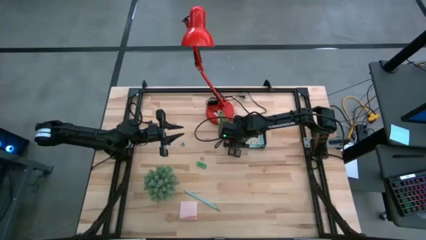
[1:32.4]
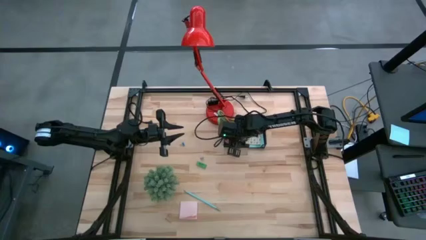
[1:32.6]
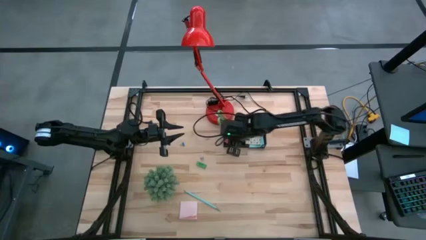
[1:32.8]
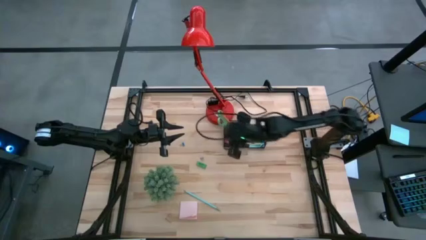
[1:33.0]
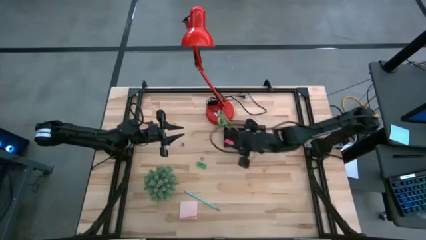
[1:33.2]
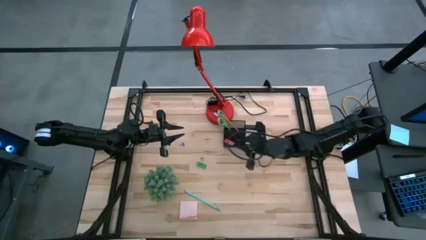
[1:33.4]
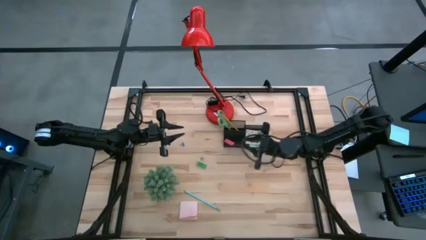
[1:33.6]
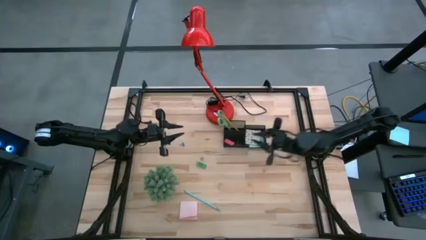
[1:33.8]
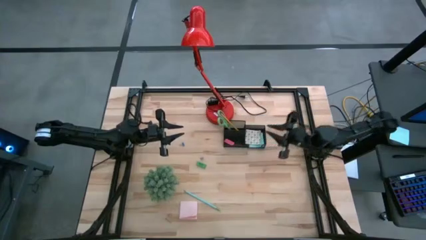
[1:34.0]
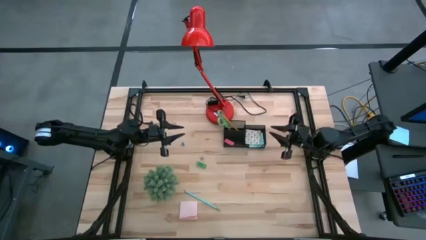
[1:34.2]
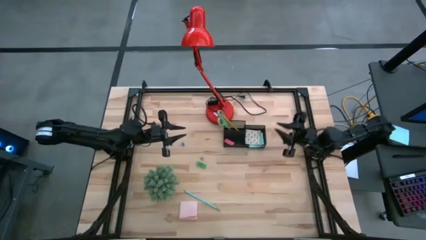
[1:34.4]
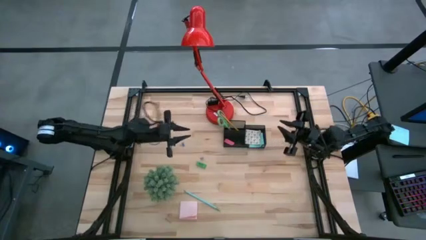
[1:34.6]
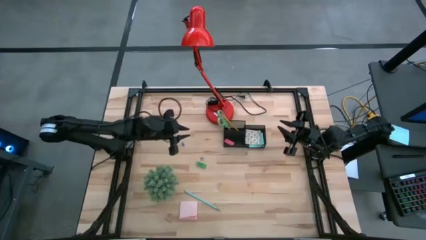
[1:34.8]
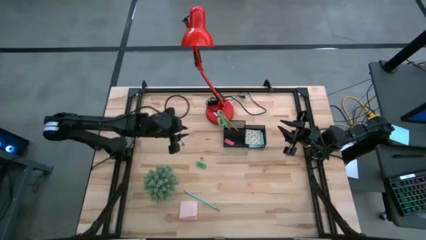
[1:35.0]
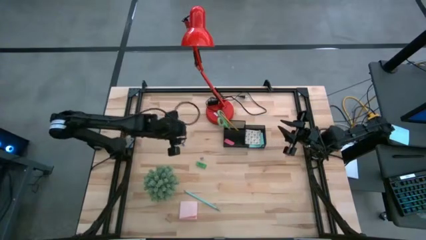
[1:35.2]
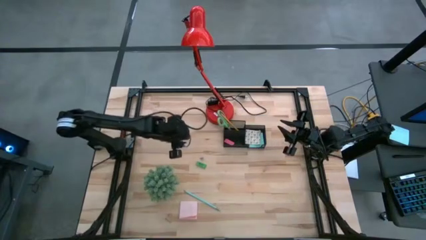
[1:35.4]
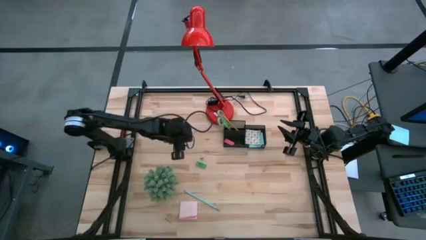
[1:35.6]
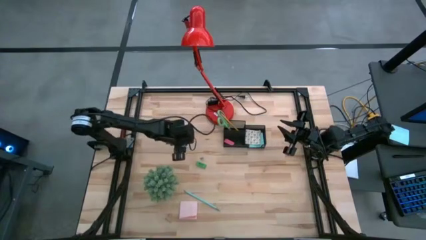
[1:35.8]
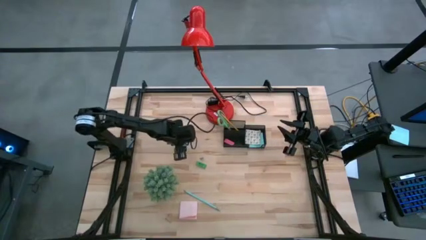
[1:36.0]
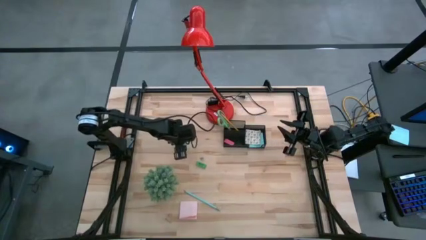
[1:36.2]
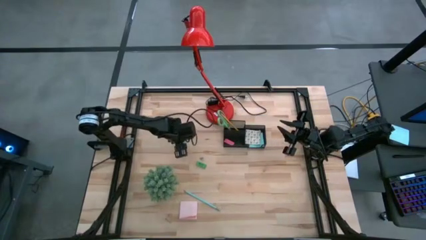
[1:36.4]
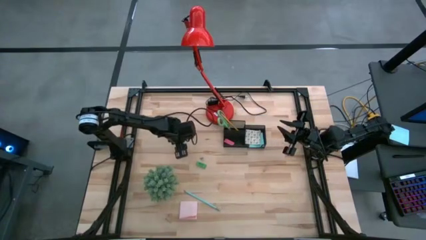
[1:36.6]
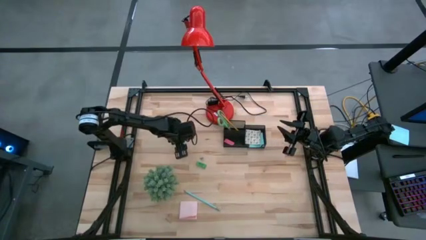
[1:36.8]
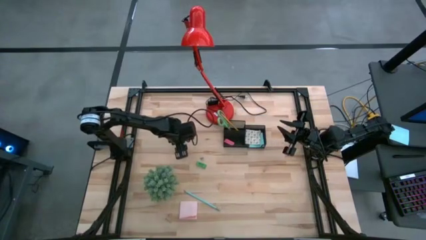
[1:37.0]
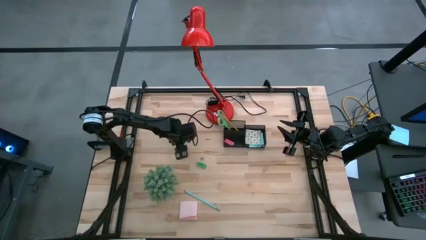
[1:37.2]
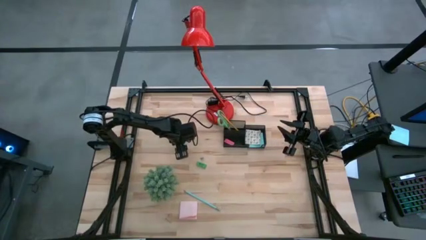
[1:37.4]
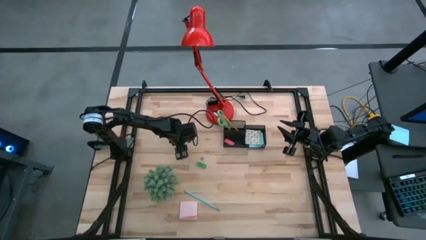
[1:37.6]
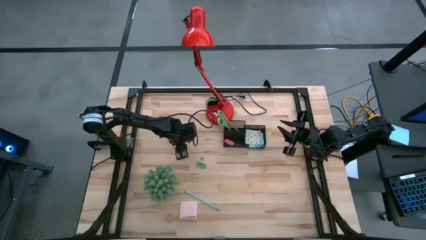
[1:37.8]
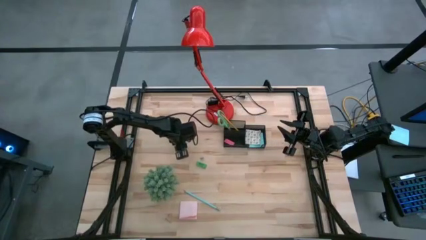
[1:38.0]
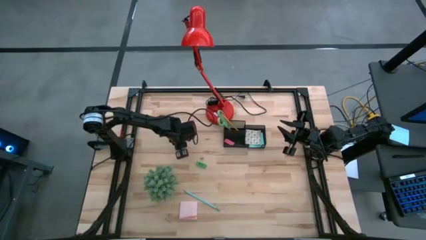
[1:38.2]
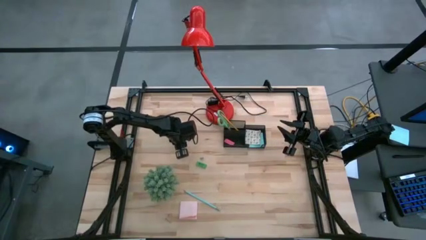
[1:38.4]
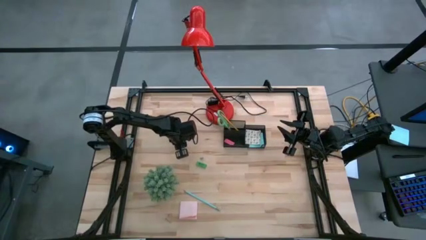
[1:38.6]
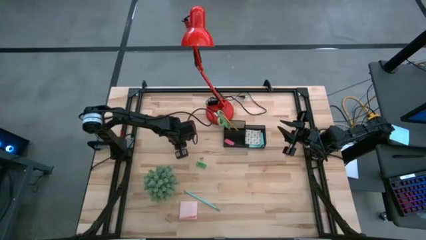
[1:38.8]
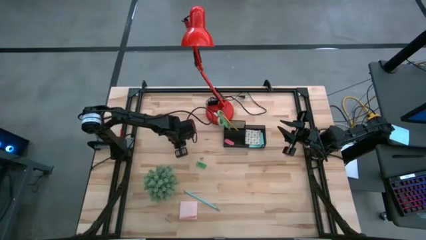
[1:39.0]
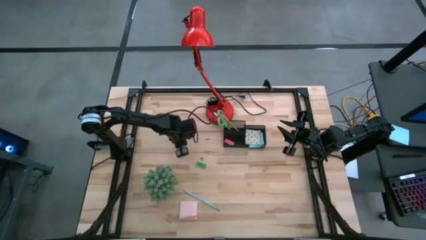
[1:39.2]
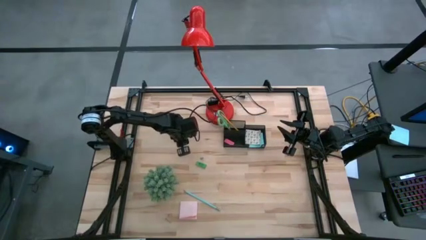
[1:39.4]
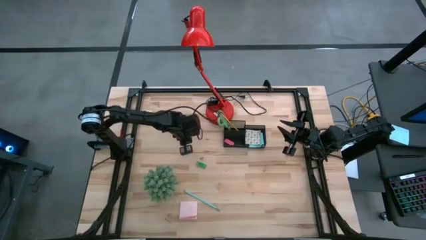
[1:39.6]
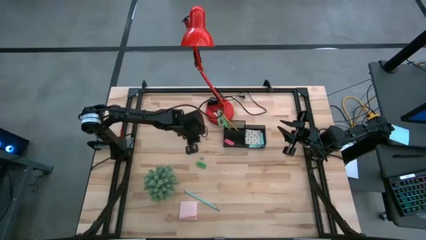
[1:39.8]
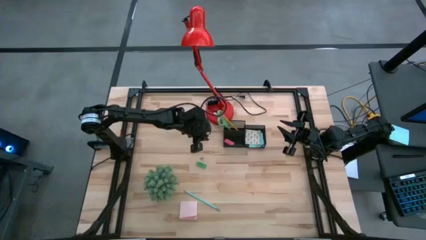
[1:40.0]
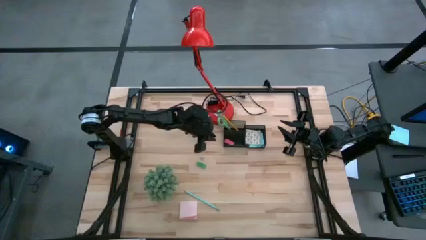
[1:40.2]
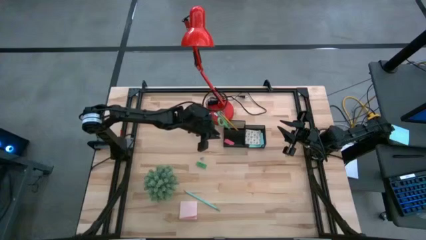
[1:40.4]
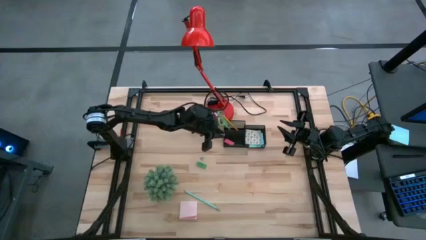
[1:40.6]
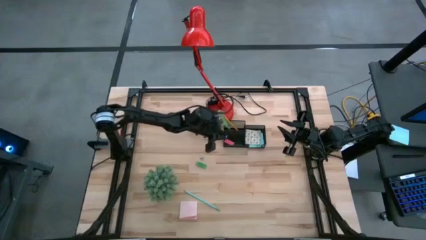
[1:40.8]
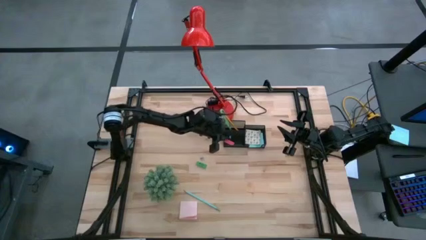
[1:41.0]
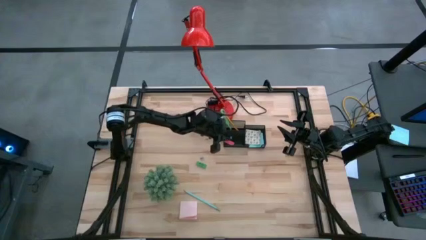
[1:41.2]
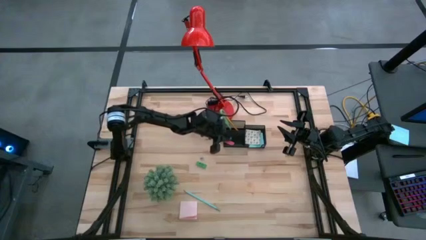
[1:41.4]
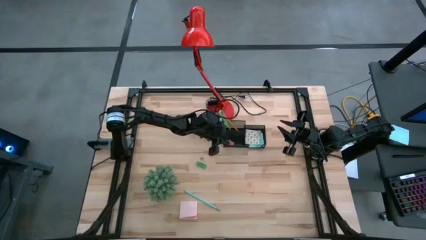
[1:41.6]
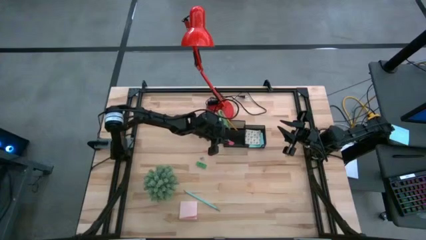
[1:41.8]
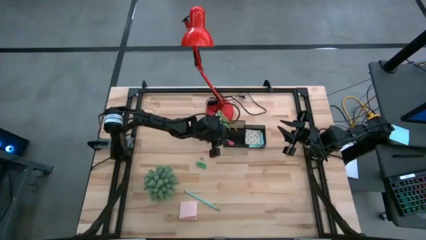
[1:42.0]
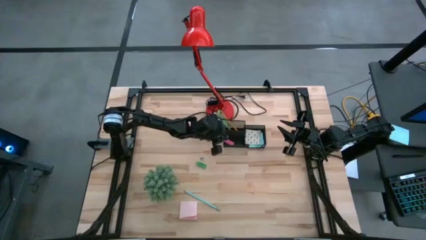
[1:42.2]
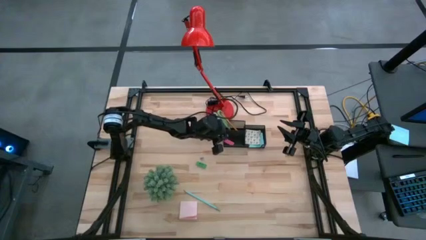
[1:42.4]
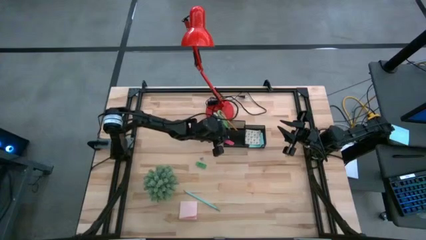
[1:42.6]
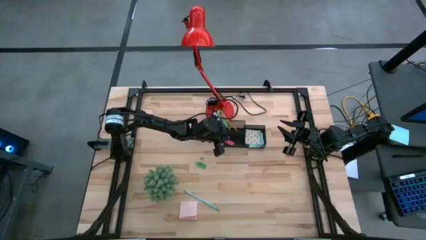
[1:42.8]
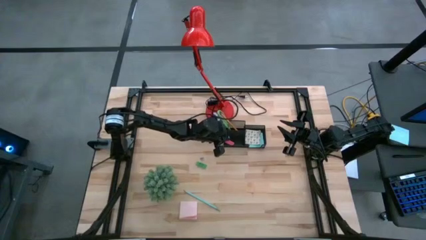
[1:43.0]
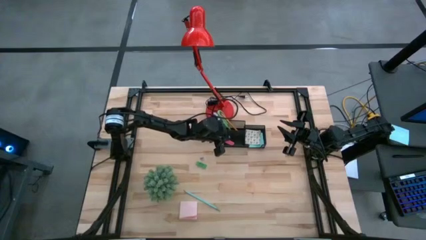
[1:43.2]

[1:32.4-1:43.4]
Task: Pick and place office supplies into organizer
Put the top binder clip into the front left compartment of the desk organizer

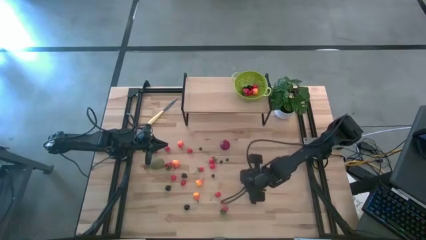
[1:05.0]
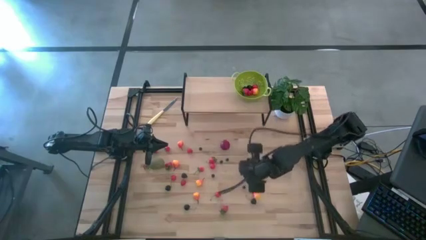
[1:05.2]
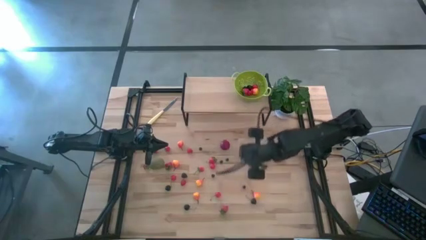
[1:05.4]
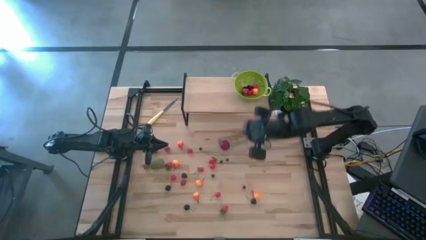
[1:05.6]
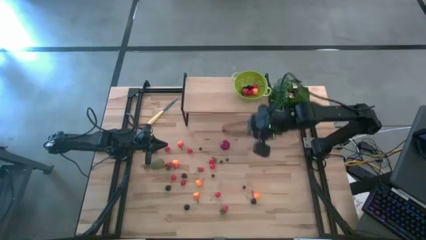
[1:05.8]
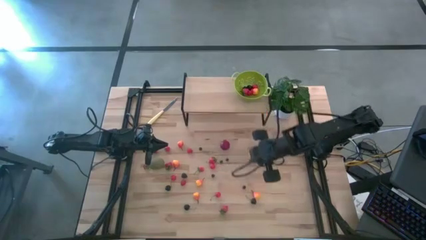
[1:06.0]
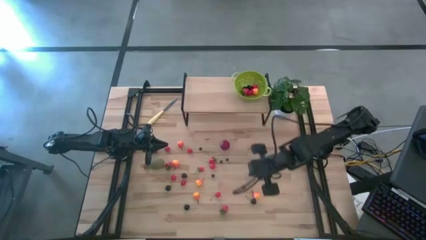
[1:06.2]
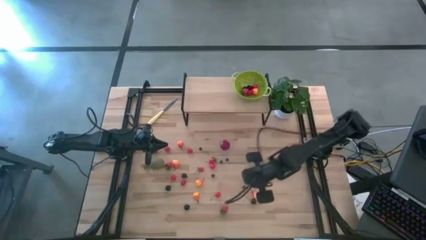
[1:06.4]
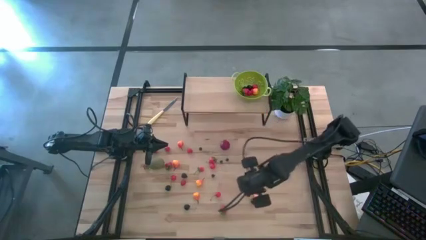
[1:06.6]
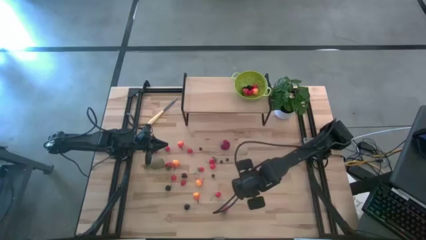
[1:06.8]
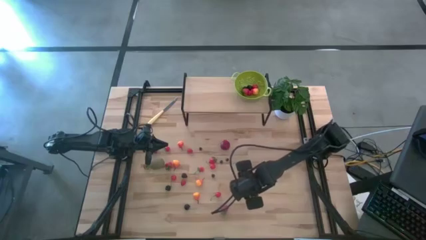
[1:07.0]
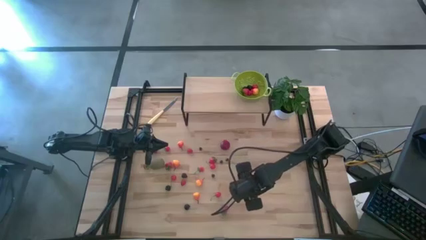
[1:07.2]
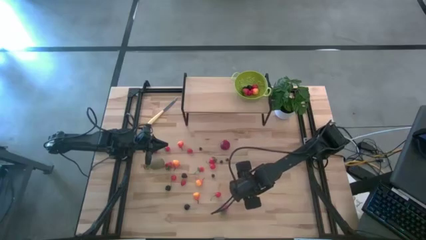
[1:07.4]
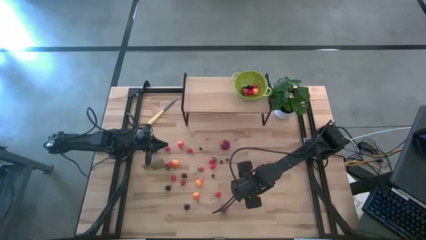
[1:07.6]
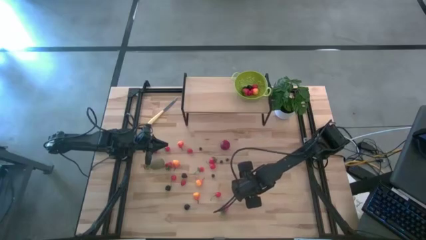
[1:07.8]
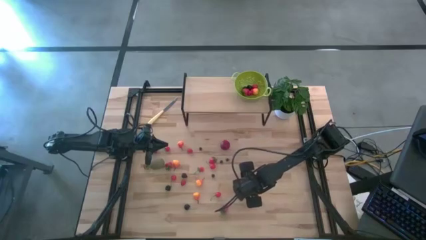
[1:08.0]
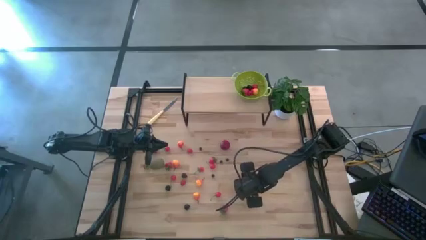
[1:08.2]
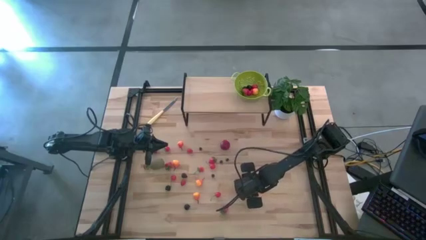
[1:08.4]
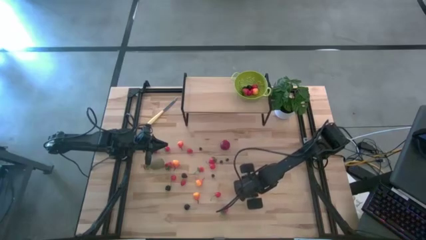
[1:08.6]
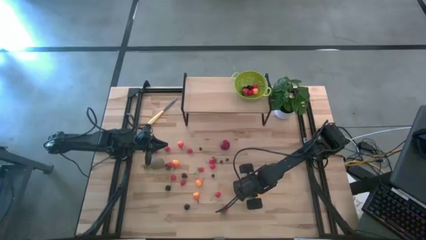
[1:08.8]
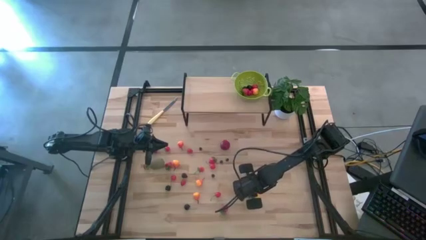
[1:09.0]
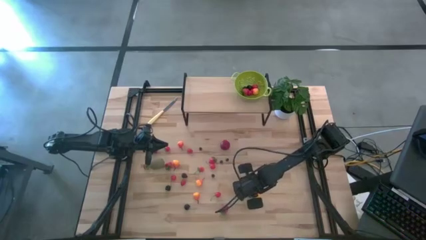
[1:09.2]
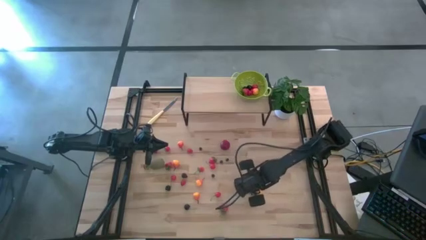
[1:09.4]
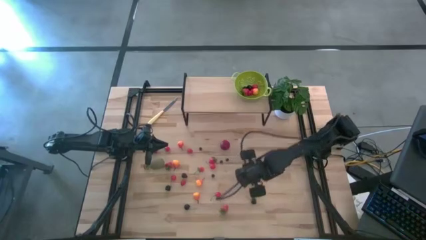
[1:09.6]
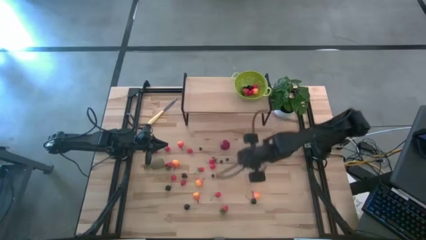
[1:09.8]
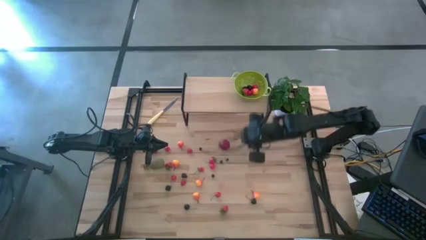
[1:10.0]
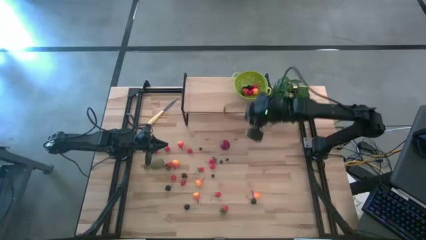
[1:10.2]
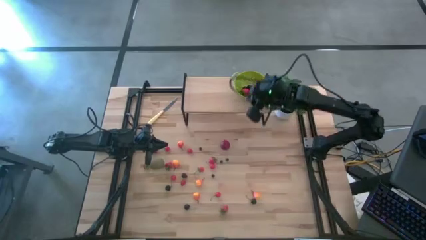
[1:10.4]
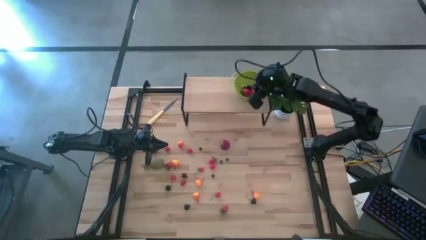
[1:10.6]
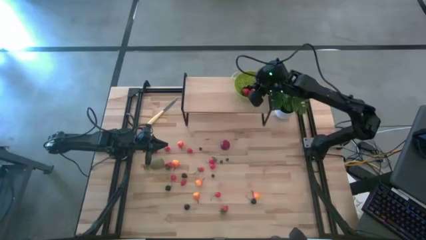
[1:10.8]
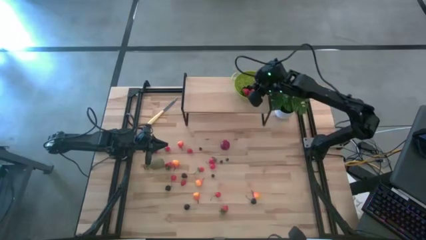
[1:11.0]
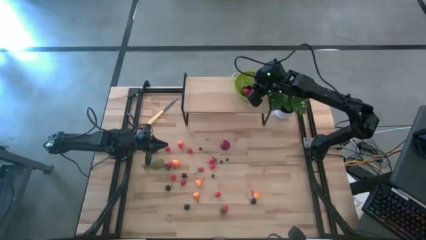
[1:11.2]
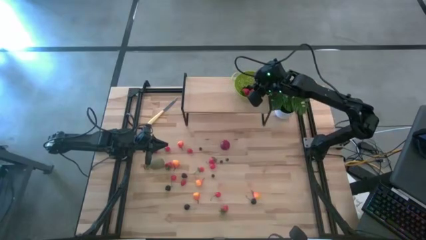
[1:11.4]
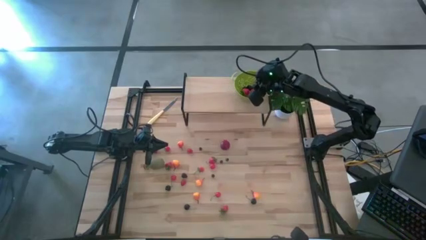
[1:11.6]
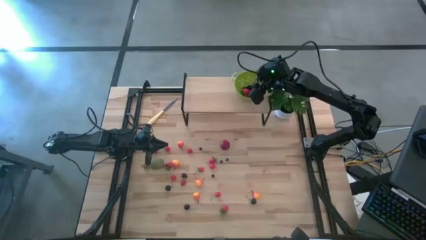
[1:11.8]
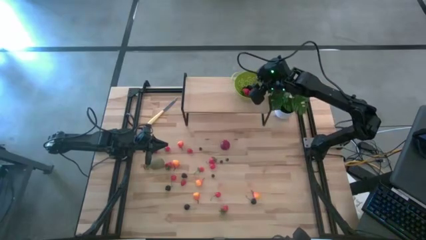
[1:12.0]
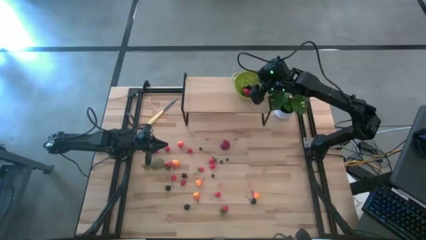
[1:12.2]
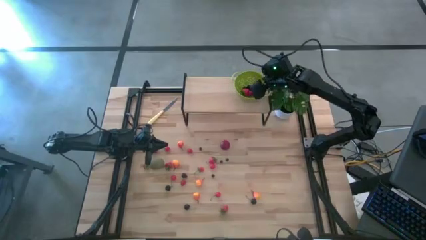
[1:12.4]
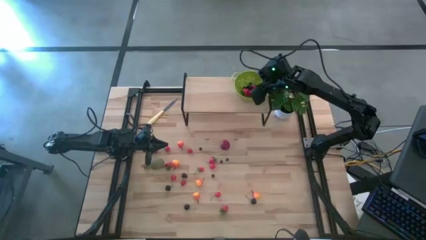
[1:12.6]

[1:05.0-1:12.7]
Task: Build produce basket
Put the blueberry into green basket
